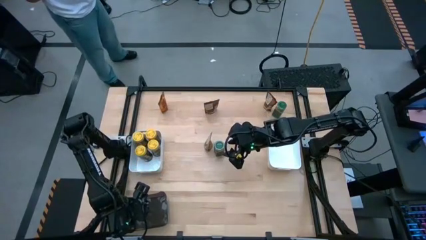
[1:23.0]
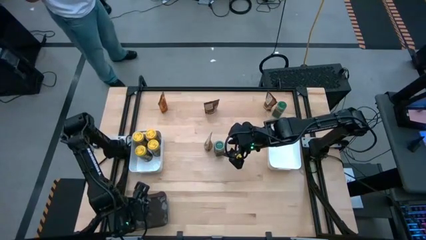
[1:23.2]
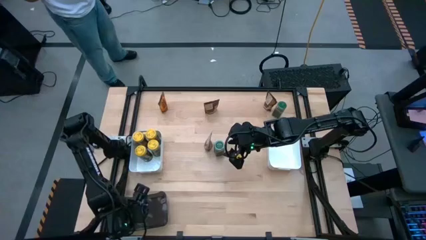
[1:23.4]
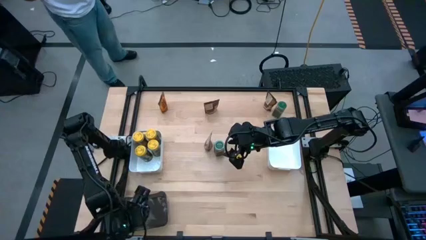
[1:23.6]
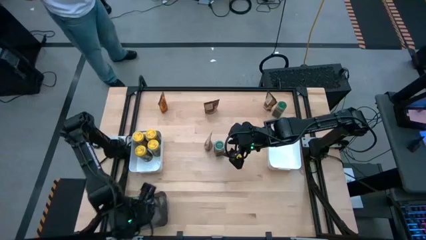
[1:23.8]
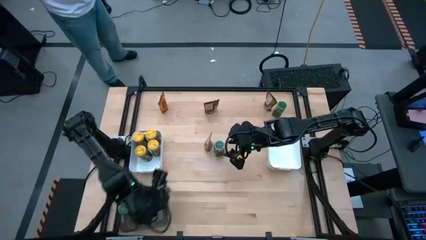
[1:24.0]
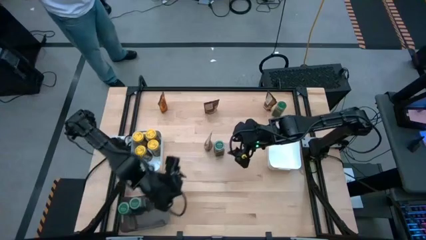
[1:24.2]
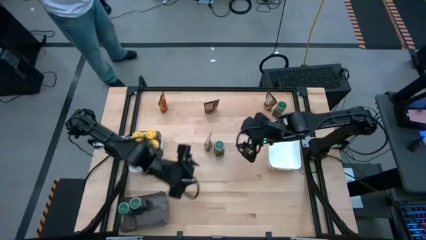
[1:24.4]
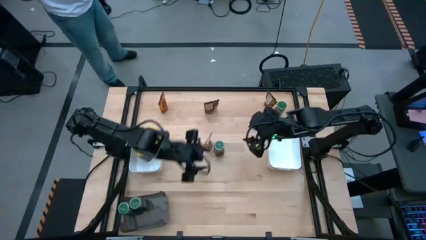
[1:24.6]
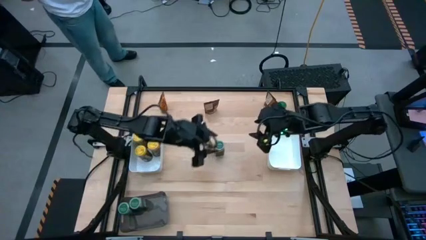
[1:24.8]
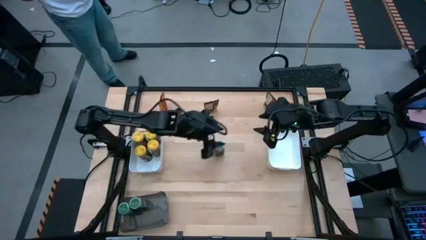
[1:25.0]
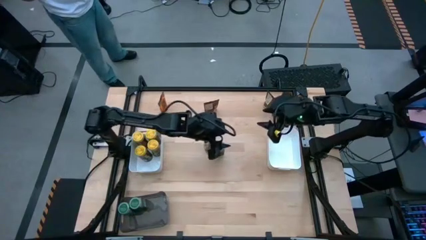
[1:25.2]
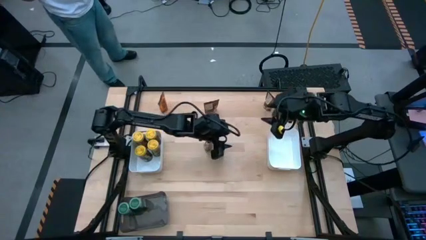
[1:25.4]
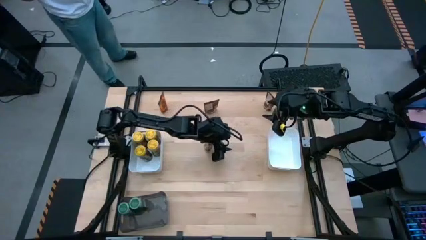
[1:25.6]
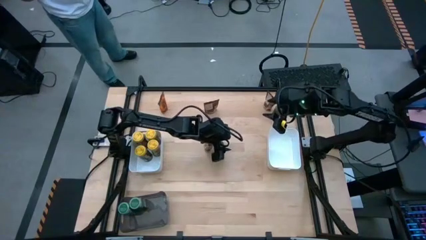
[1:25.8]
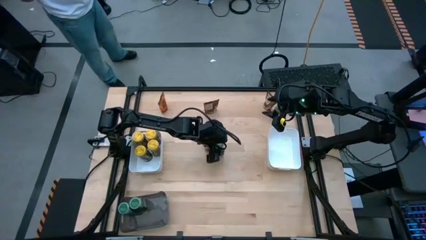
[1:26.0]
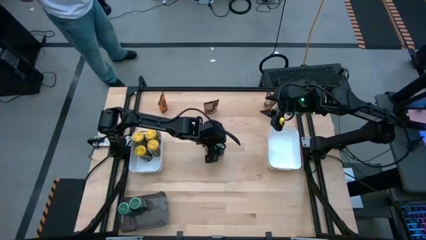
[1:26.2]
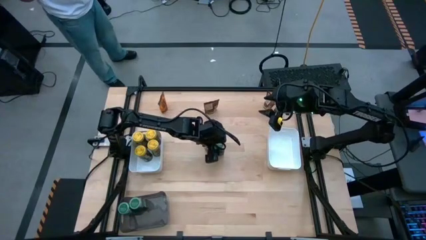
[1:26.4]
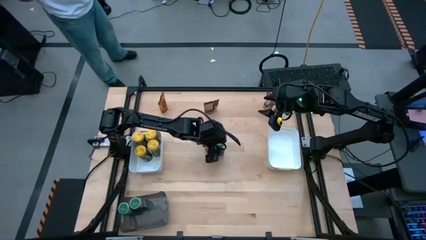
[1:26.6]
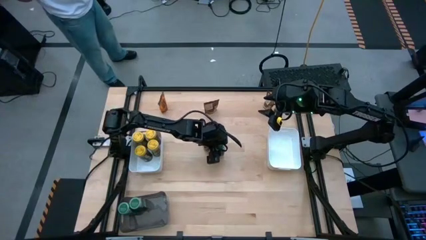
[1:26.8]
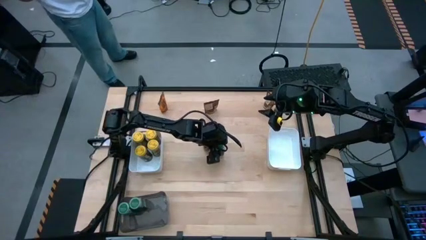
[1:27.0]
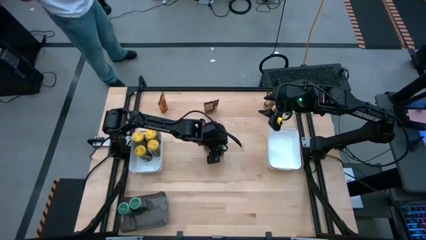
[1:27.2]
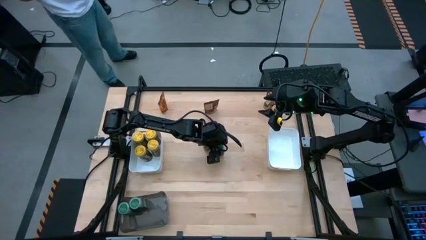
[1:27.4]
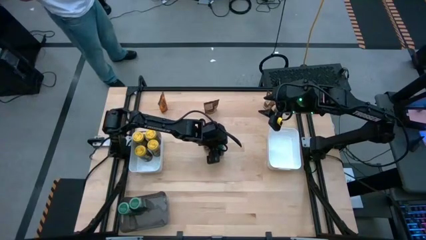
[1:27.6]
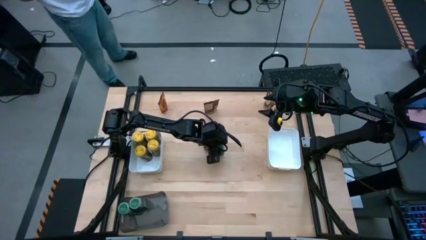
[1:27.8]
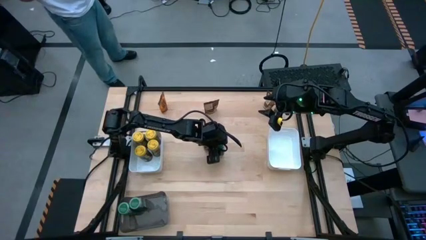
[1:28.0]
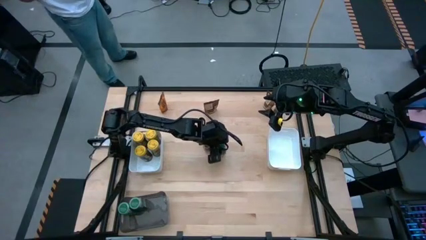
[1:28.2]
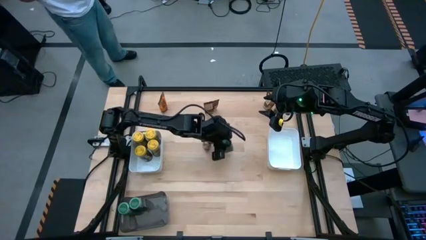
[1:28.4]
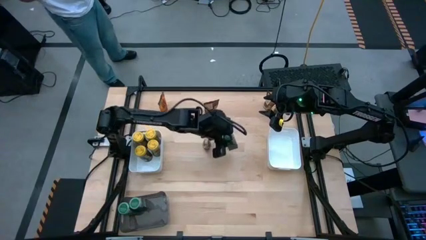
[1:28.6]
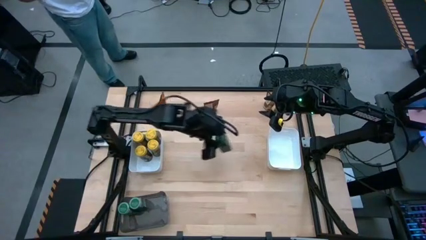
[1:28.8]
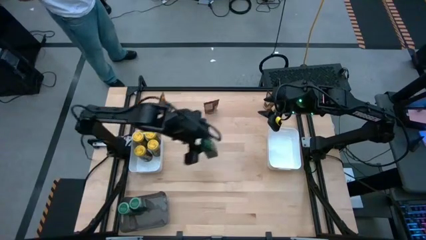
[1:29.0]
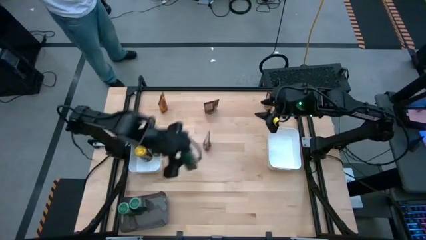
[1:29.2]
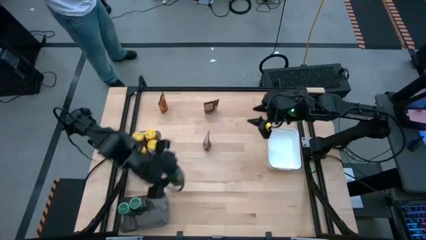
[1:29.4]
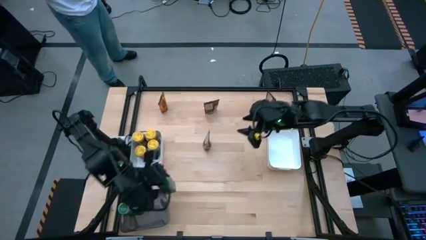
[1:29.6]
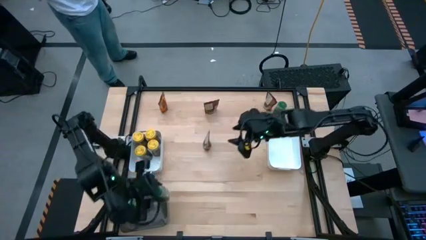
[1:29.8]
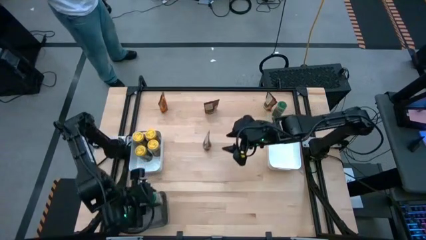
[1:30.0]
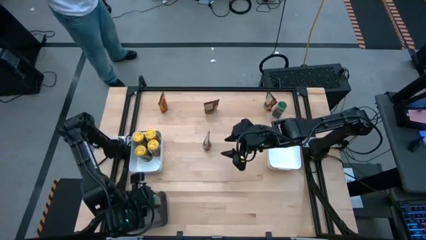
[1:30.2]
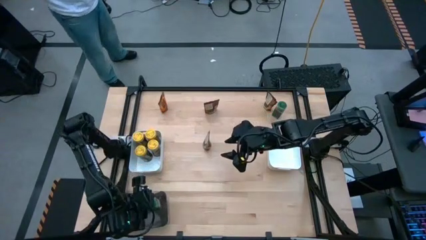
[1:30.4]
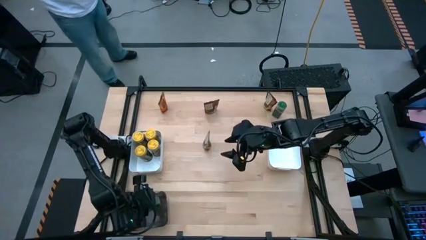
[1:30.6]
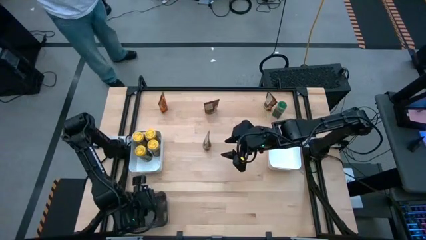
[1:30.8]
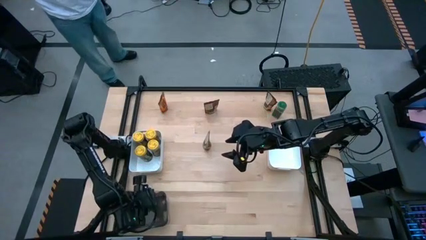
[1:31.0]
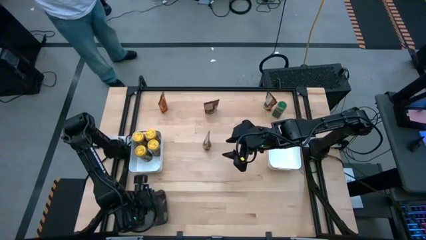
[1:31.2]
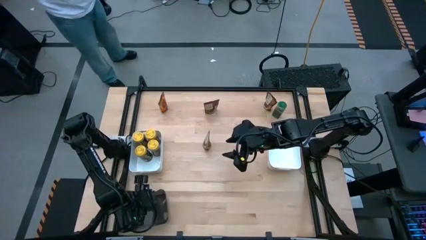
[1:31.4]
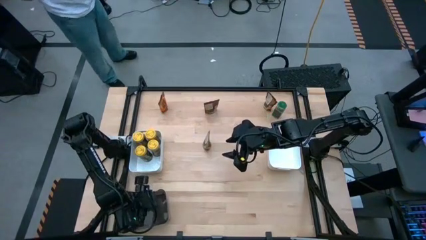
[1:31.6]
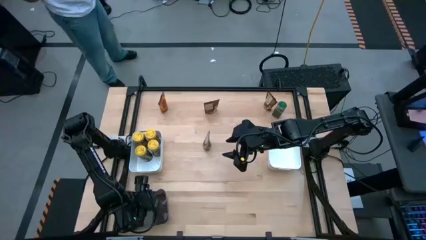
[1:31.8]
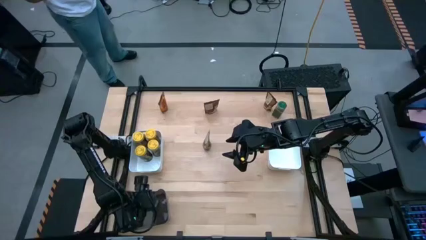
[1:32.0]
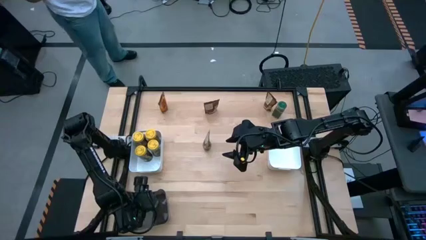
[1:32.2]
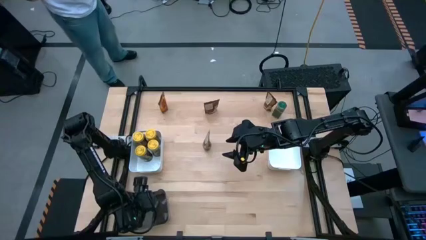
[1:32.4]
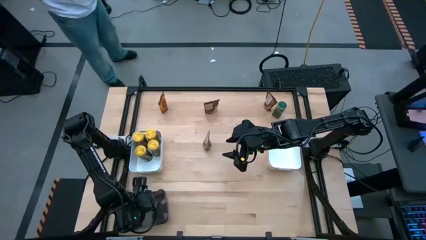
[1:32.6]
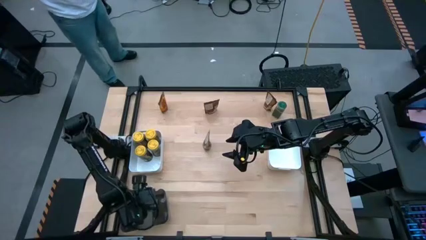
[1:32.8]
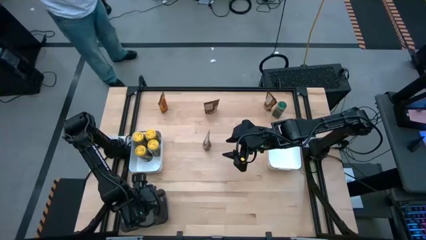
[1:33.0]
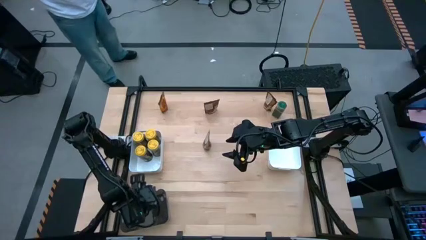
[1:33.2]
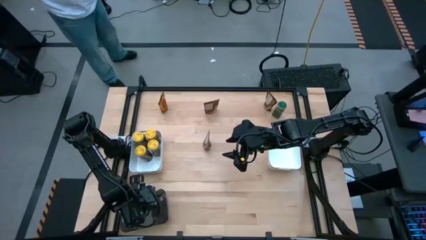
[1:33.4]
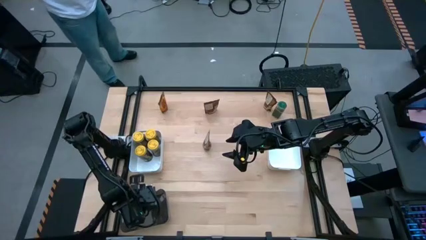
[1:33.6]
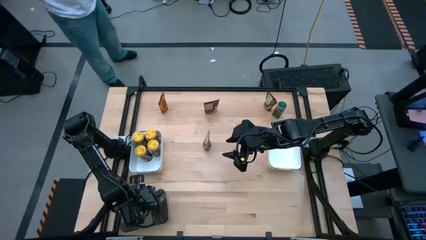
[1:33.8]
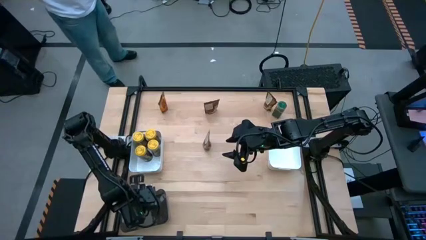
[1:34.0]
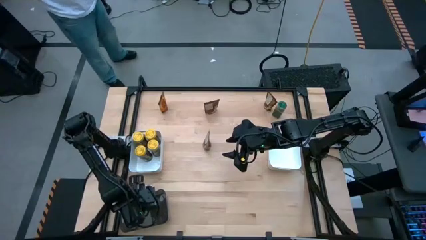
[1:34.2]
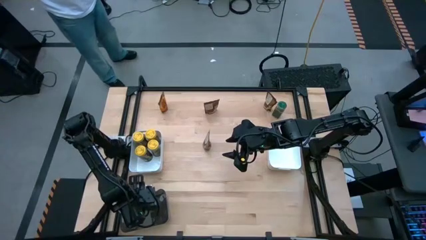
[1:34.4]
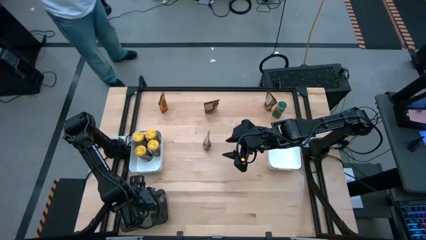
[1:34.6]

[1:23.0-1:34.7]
Task: Sort spices by type
Put the bottom green seasoning bottle into the black bin

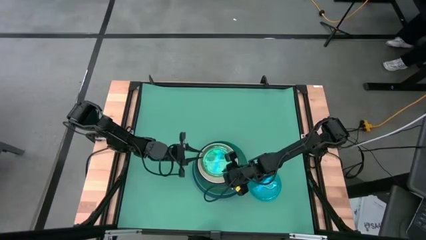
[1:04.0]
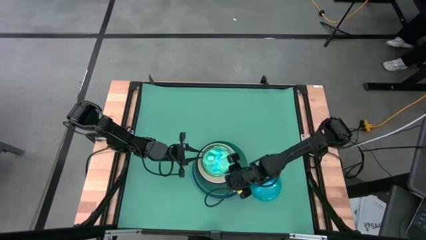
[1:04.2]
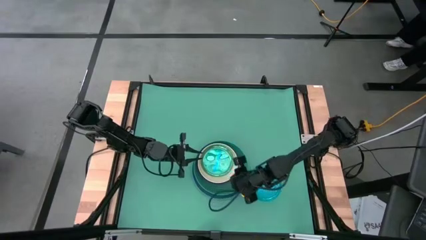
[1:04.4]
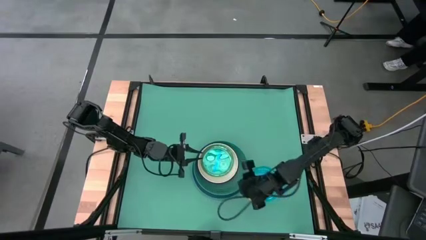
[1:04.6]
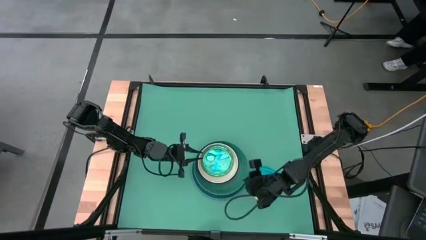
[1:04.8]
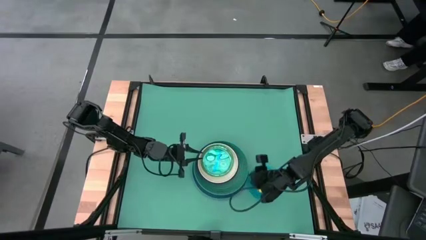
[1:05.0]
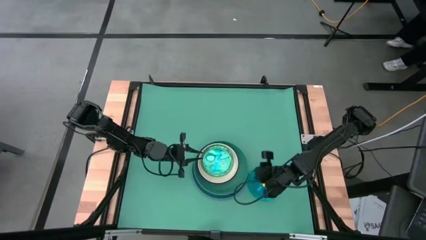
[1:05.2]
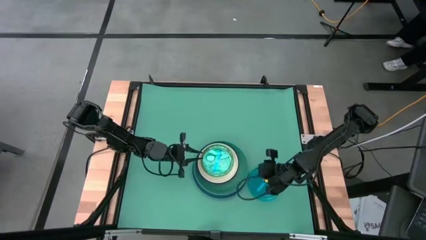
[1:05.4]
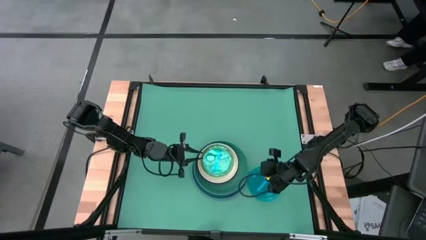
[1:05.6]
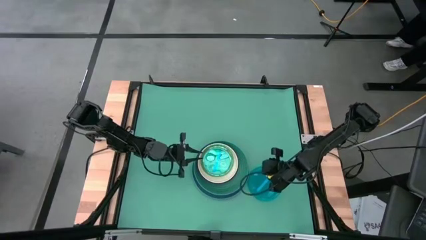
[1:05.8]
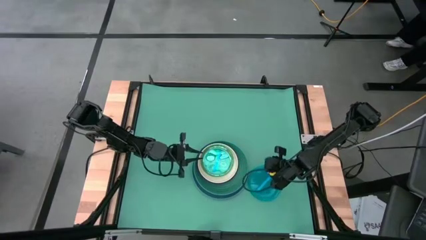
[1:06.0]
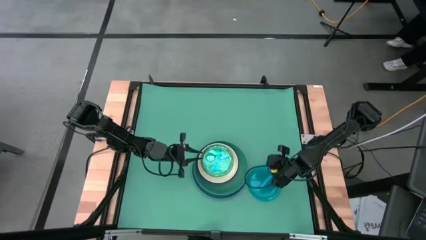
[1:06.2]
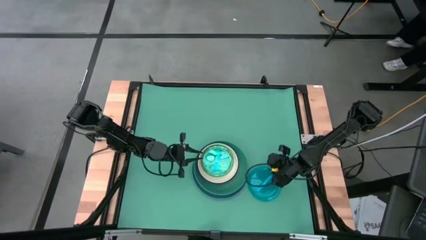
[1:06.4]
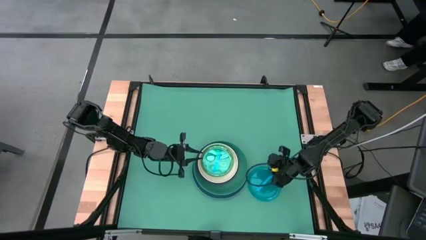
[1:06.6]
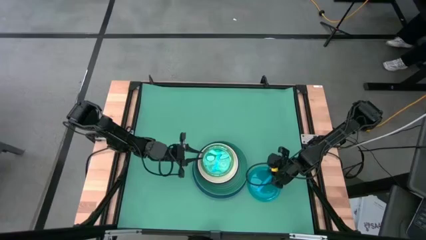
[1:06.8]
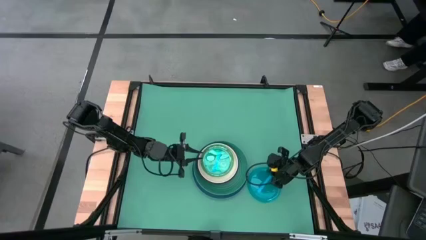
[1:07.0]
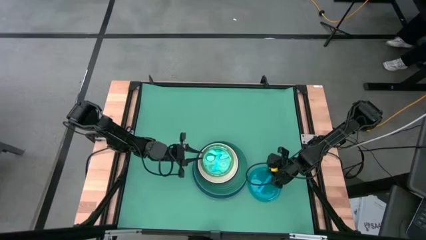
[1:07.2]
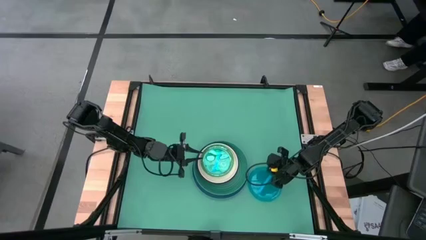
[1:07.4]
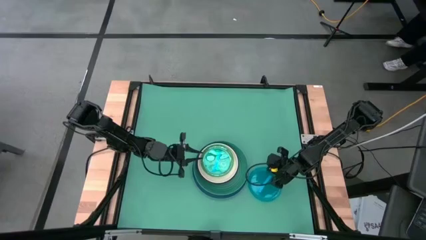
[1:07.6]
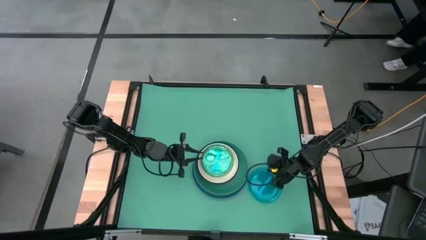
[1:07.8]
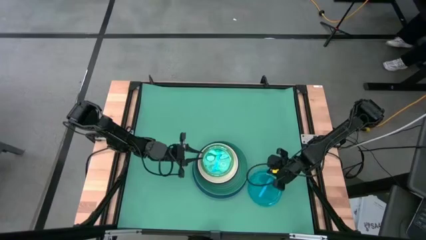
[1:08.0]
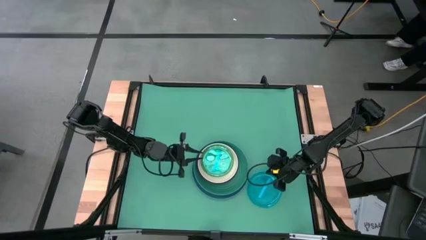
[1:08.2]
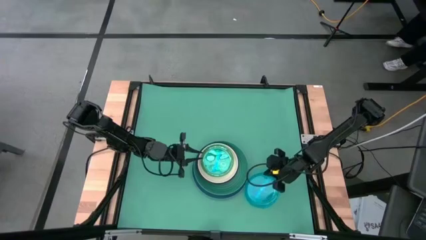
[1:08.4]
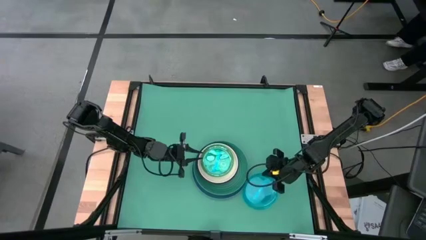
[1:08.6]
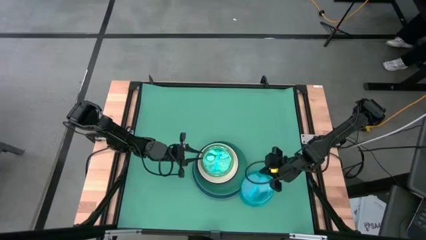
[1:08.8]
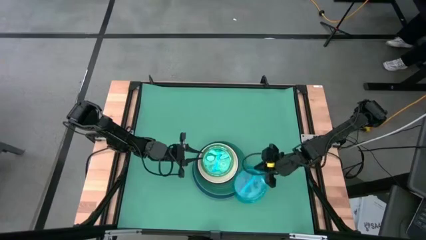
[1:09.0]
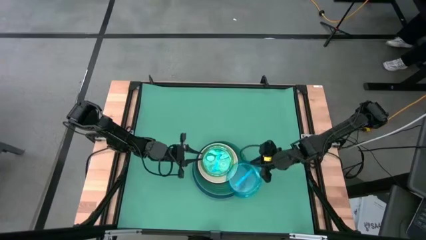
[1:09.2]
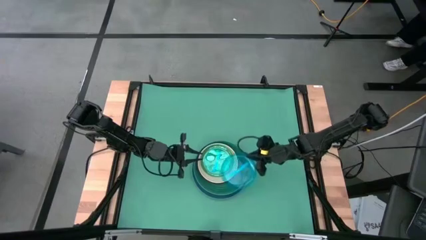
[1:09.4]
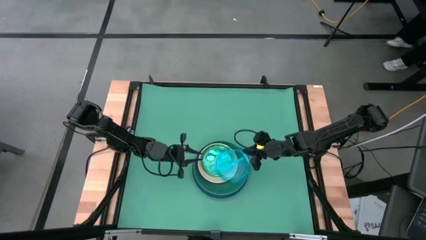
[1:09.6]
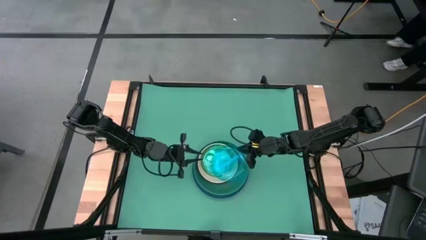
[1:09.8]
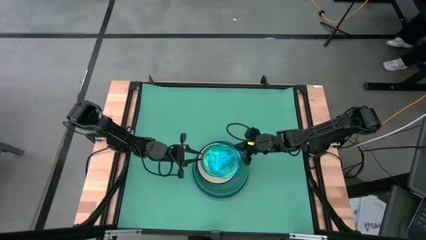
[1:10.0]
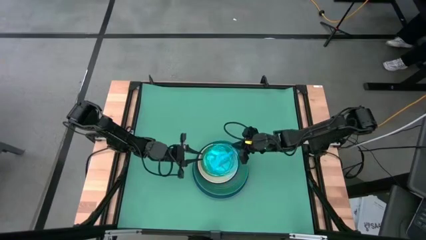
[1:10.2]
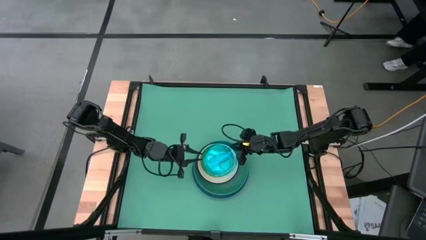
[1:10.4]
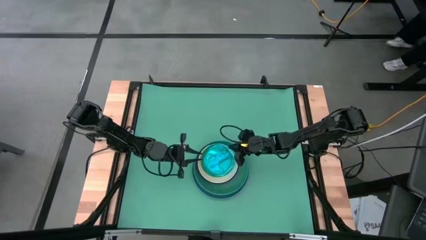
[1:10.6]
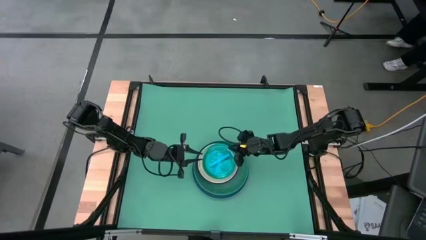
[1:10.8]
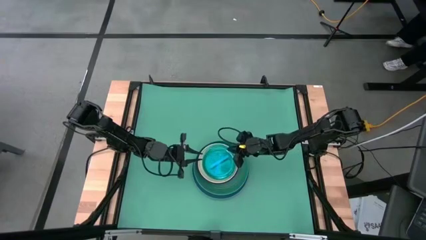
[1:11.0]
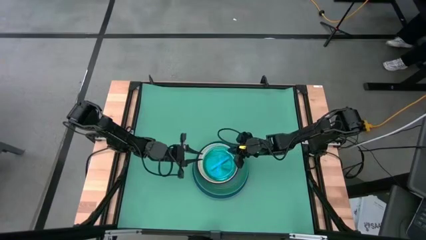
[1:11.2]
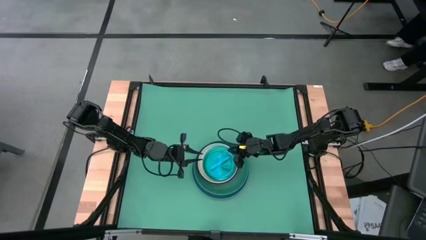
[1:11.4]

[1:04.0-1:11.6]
Task: Stack plastic plates
Stack the transparent light blue plate on top of the light blue plate
